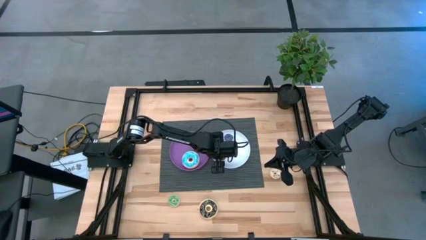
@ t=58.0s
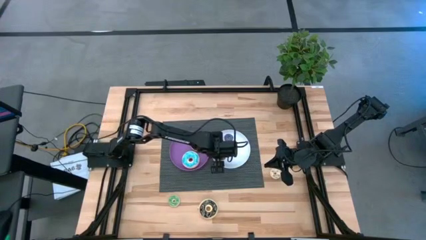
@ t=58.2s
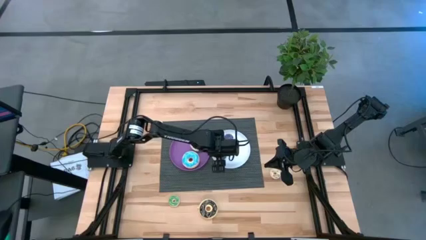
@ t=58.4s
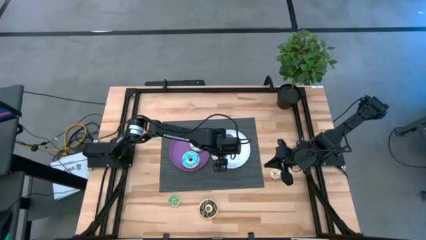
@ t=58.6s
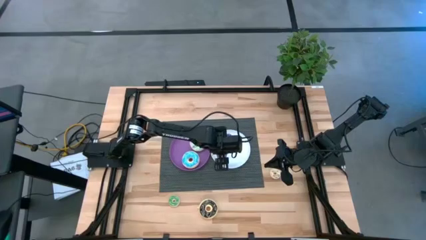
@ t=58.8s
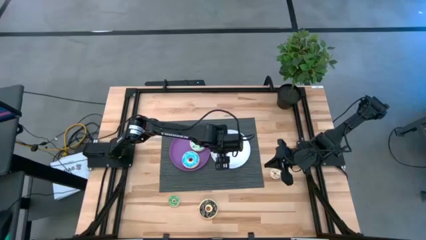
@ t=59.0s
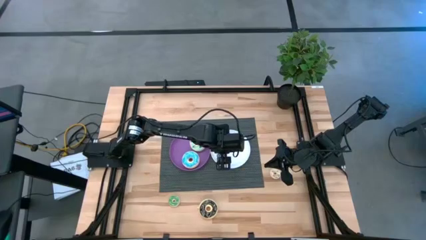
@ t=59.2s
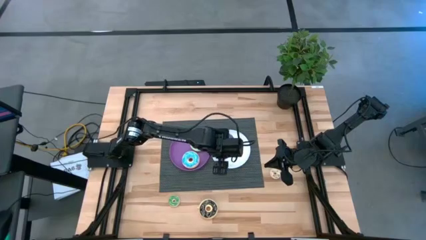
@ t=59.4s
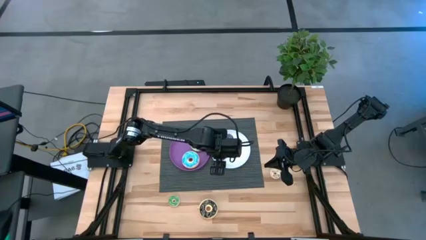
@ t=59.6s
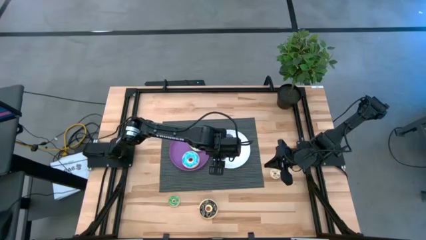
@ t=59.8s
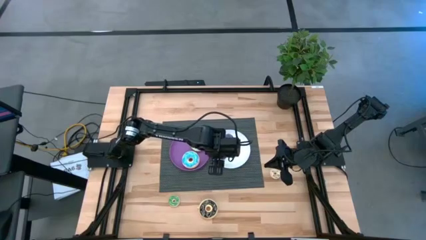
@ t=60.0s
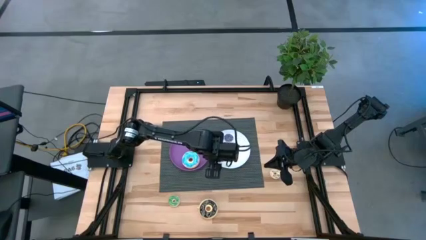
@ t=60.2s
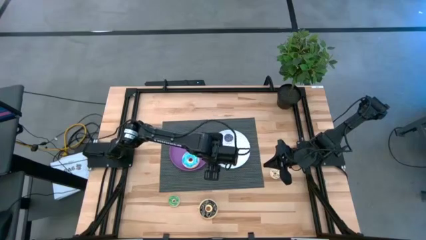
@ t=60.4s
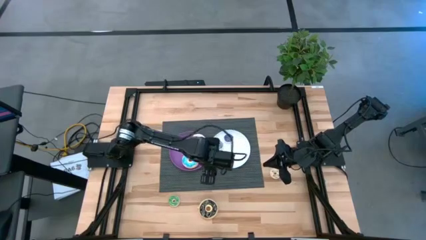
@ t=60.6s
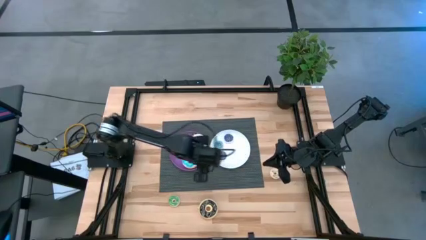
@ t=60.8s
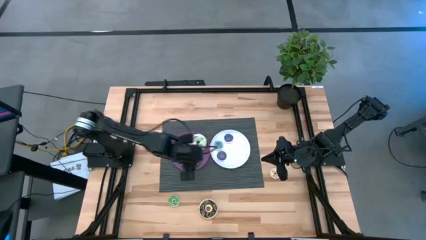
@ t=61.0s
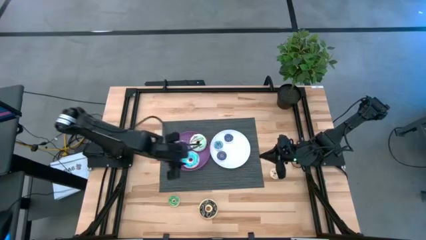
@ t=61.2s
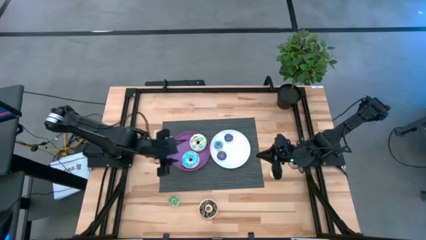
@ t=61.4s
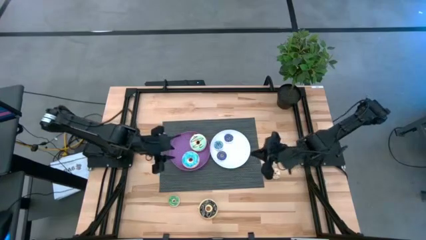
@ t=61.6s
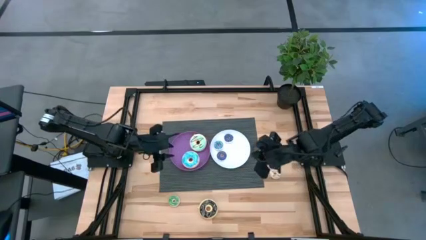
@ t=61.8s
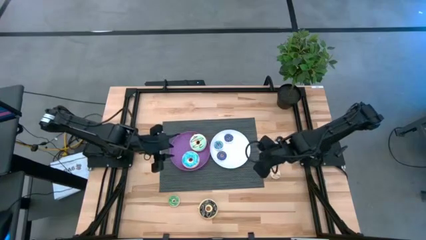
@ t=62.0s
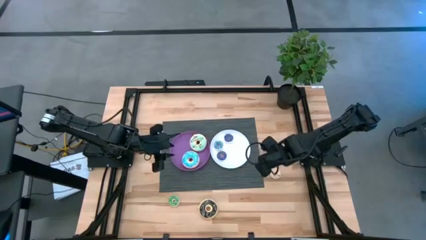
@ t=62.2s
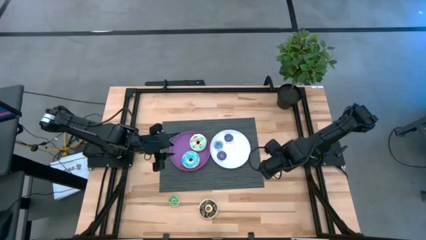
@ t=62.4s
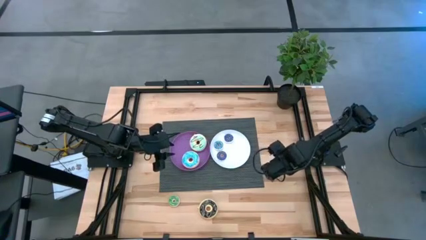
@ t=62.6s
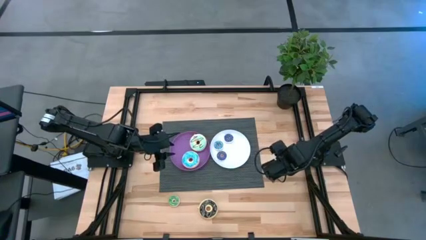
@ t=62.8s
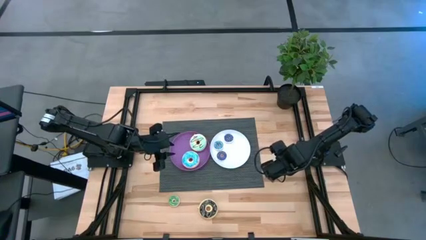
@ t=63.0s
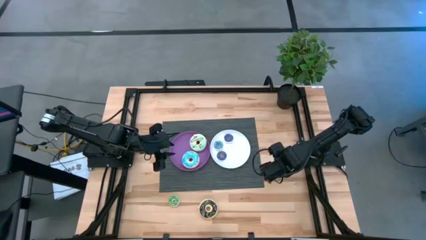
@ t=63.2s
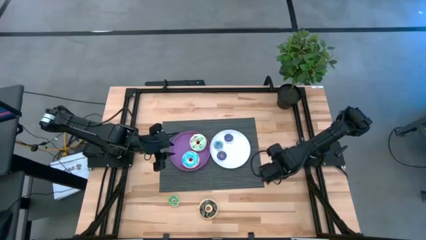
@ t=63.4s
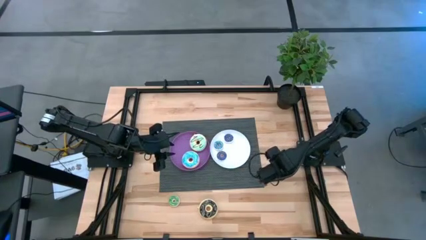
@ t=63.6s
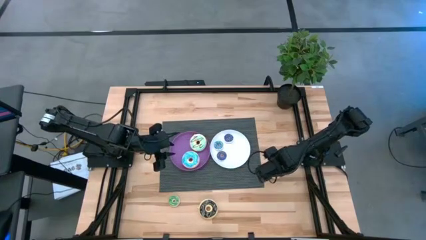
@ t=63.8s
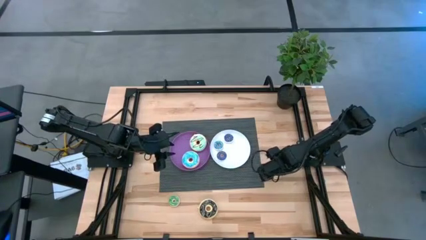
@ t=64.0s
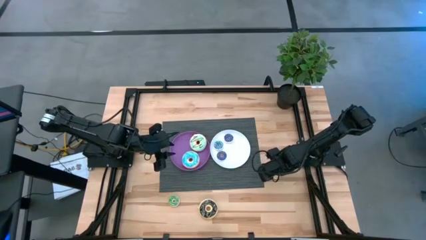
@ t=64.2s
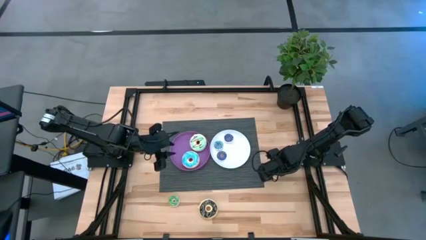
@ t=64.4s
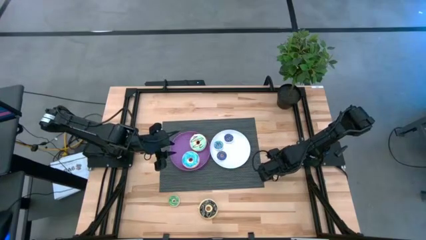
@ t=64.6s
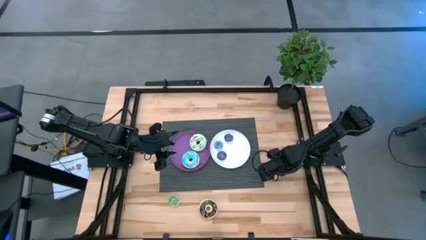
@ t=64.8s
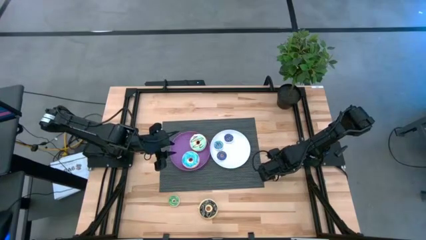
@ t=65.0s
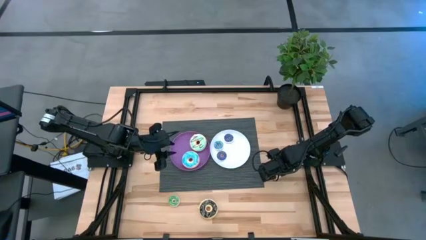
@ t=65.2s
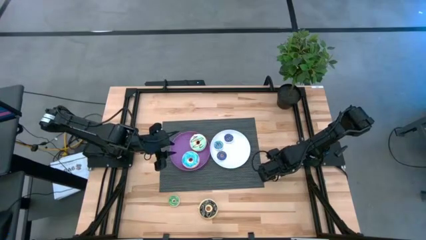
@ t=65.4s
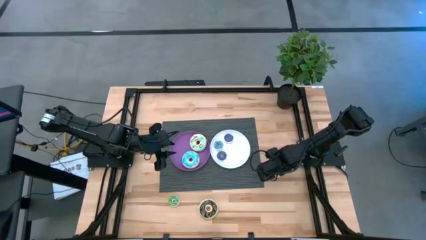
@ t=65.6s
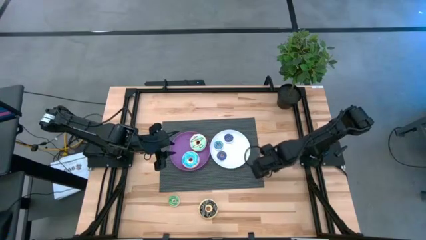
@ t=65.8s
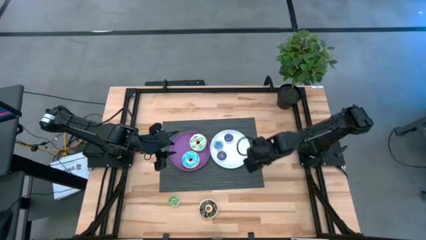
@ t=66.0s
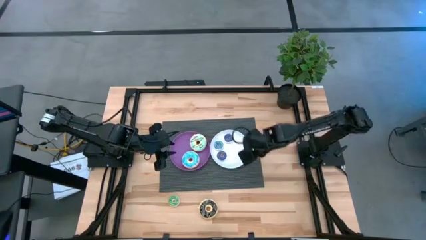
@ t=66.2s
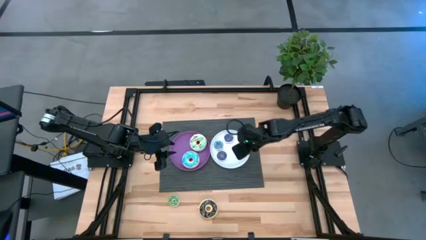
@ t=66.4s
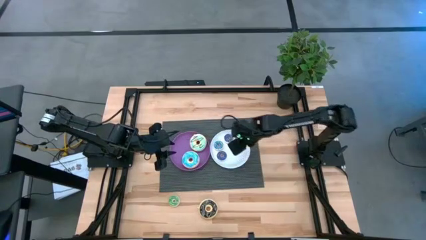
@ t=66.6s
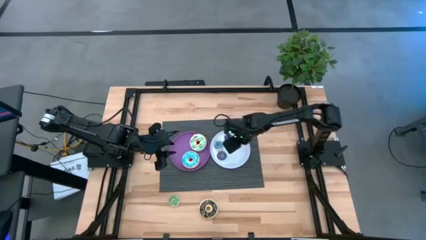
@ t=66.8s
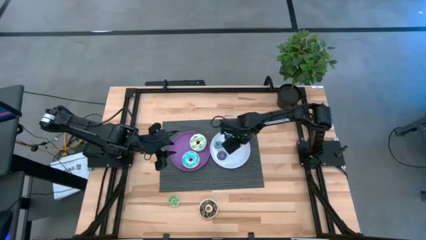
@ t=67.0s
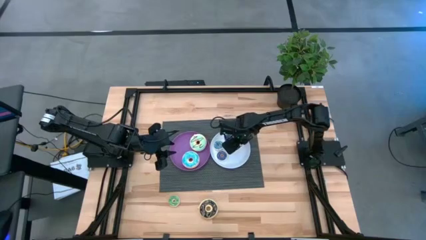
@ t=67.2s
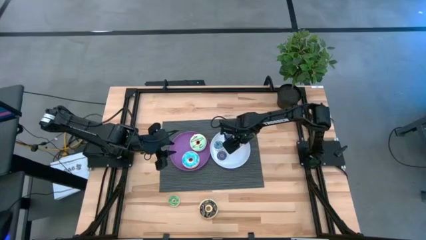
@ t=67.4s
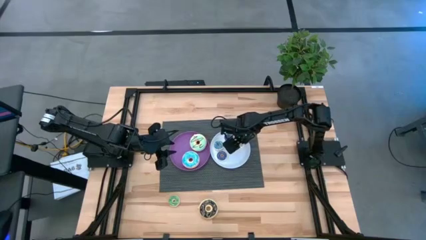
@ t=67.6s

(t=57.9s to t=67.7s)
Task: Pick & Place donuts
Put the small white donut on the white plate

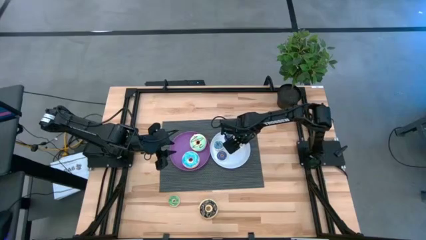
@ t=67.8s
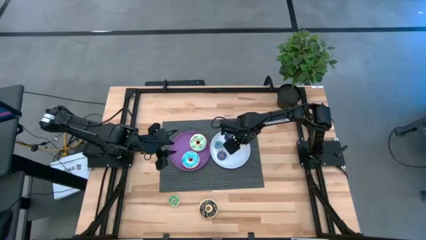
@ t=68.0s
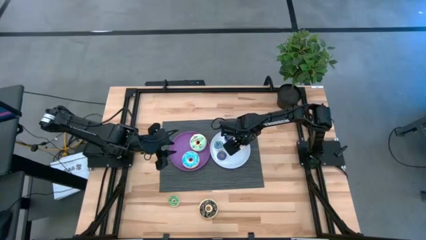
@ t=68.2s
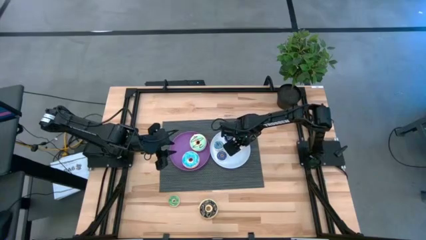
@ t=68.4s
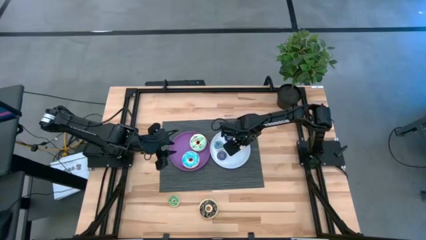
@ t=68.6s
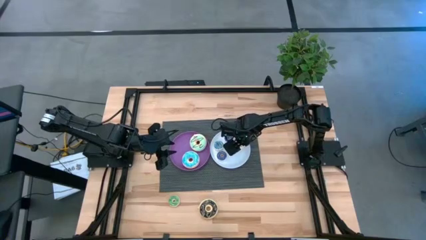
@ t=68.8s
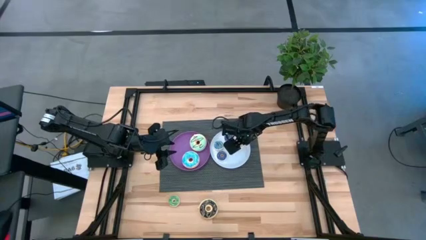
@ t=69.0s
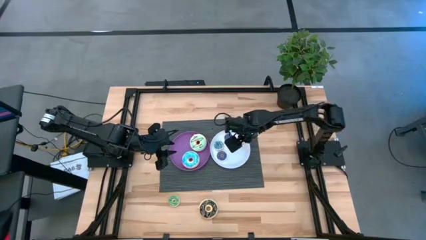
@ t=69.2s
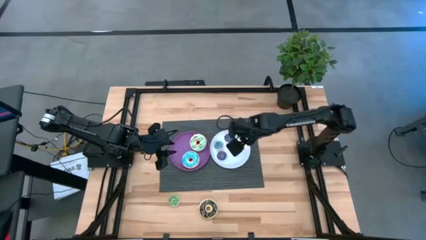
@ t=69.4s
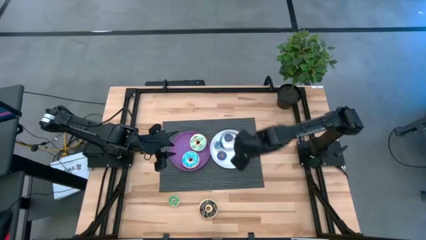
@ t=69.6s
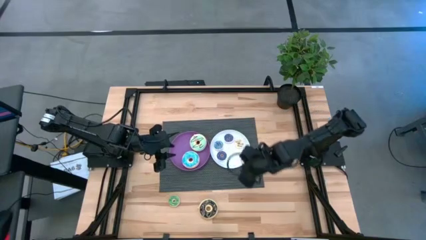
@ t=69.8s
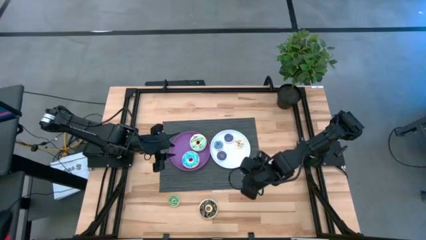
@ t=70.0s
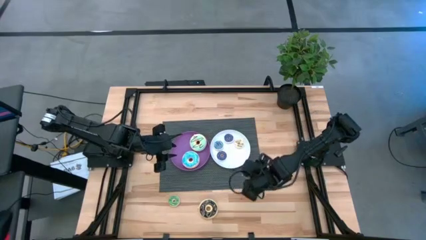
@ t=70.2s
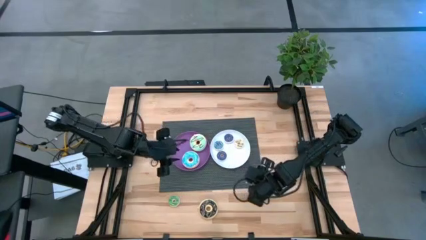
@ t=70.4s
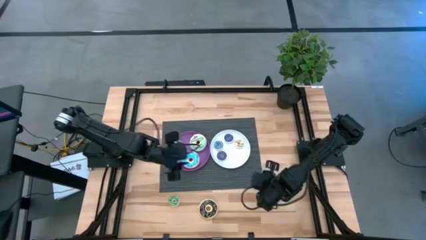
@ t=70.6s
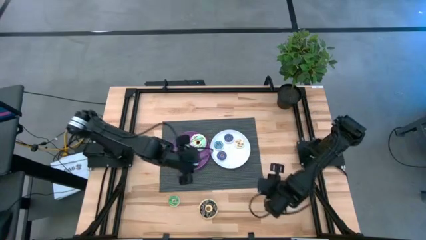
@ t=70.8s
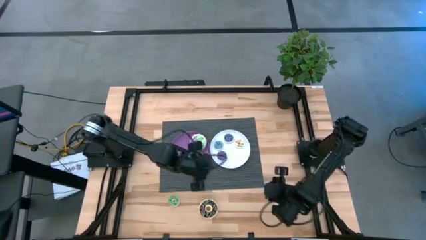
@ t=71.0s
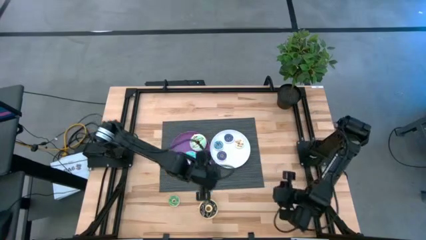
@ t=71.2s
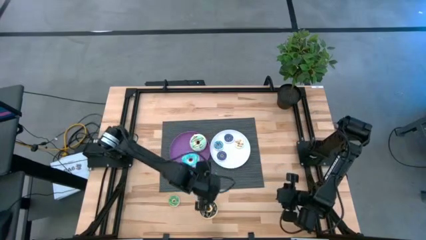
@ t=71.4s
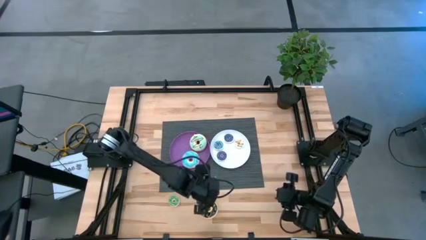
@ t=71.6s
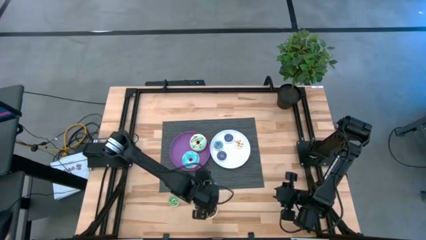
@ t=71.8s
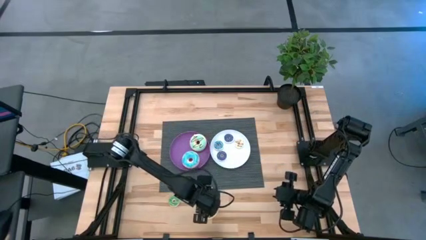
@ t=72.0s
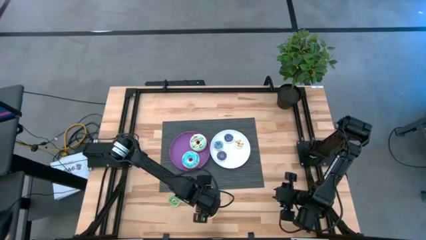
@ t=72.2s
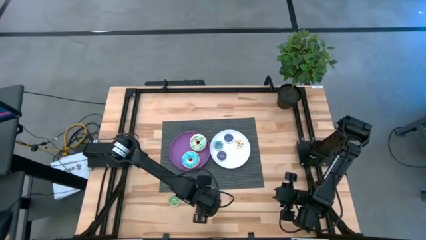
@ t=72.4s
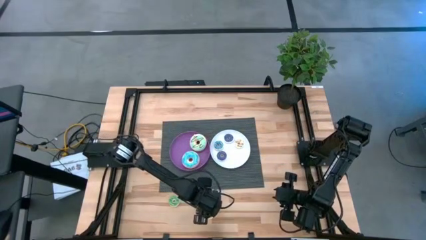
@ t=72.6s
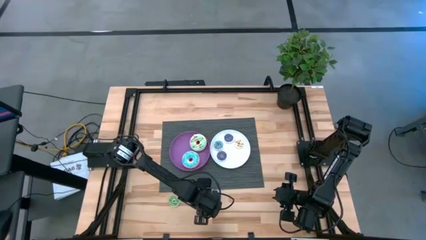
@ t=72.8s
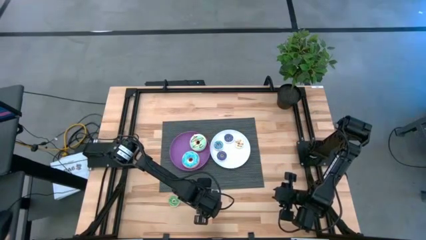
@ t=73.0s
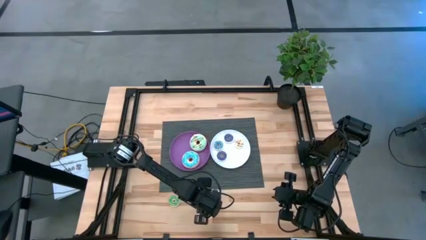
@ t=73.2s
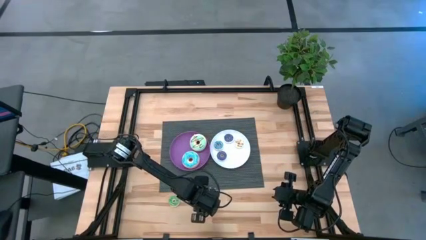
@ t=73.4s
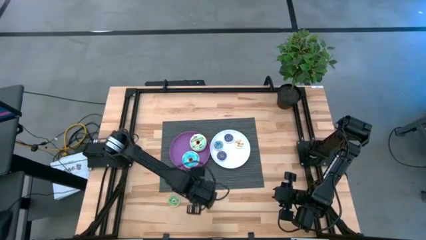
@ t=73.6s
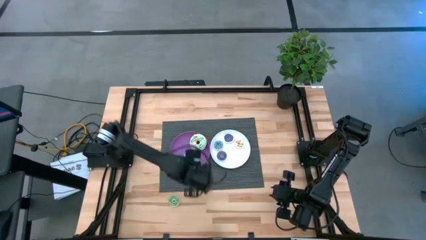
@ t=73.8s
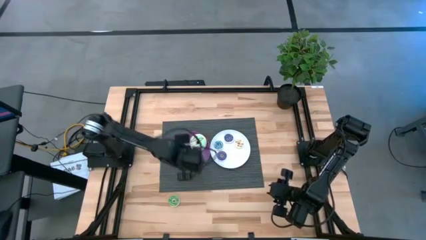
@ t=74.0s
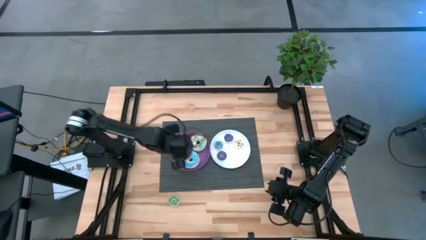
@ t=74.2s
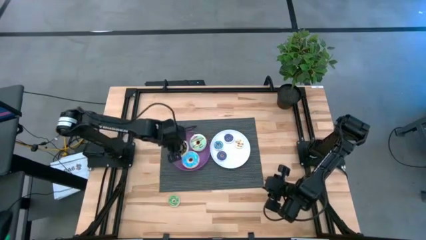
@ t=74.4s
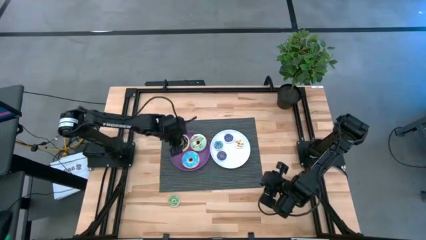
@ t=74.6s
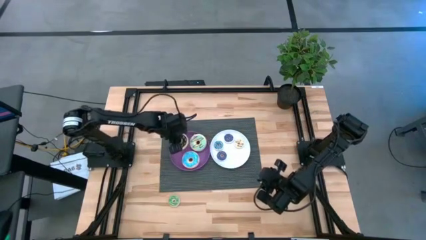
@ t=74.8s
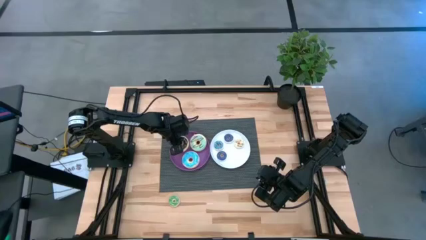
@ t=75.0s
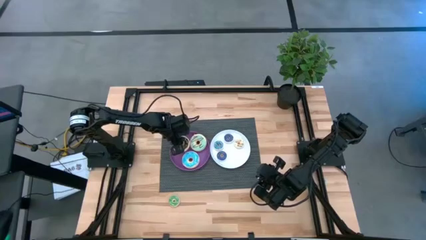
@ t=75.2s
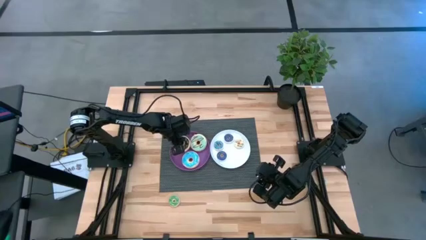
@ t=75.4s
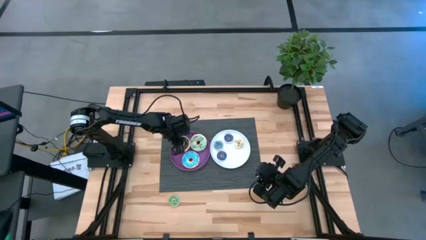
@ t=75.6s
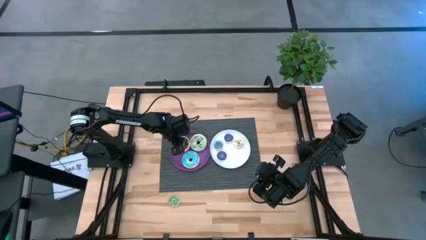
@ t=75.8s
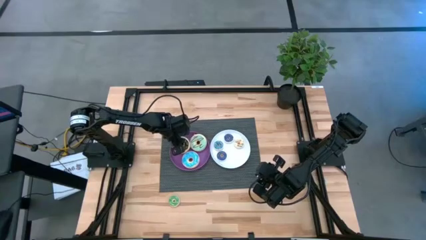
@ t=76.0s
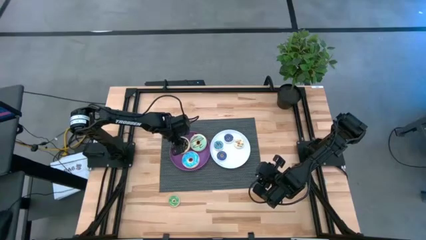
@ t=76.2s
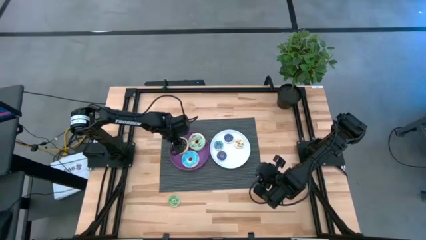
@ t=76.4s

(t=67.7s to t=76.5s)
Put the large black donut on the purple plate
